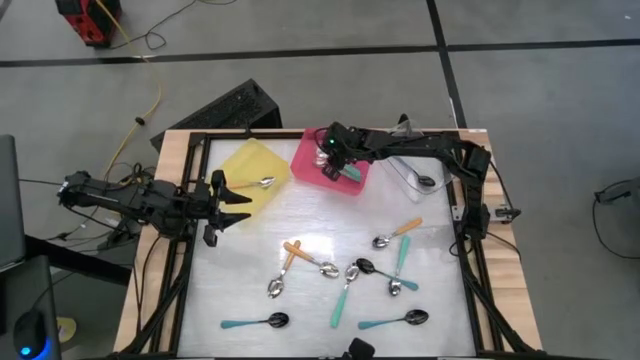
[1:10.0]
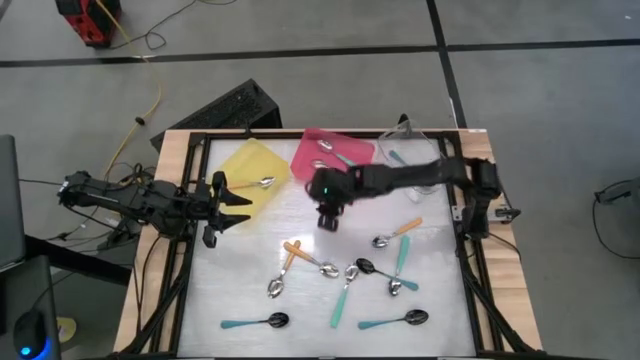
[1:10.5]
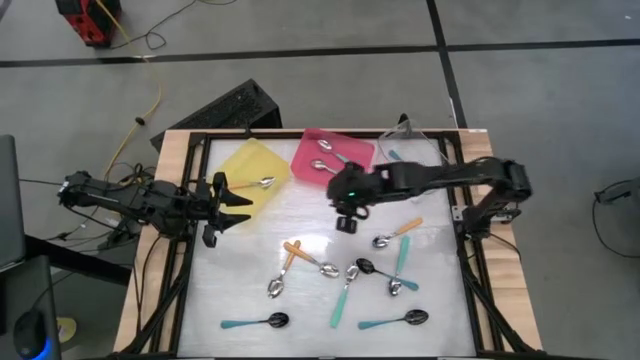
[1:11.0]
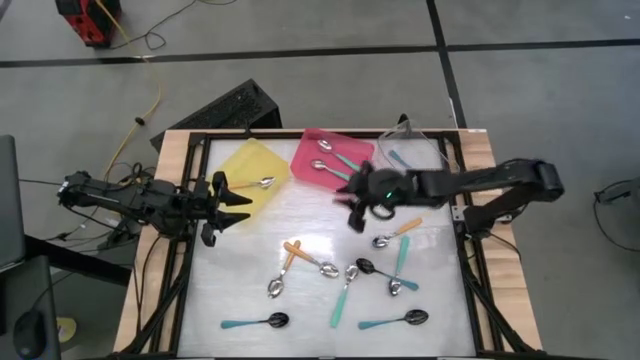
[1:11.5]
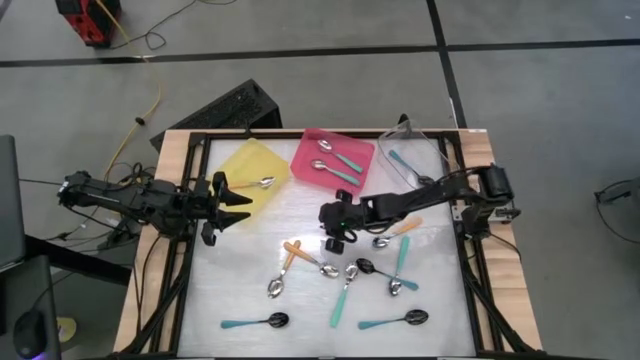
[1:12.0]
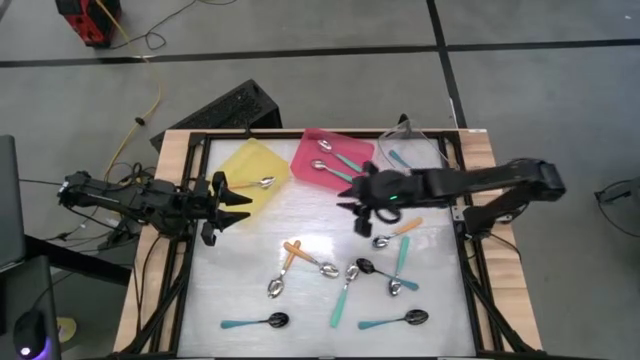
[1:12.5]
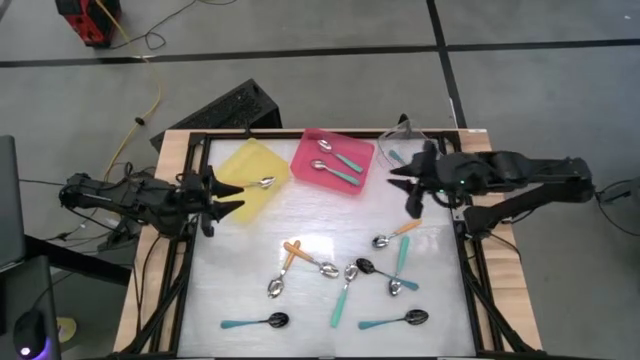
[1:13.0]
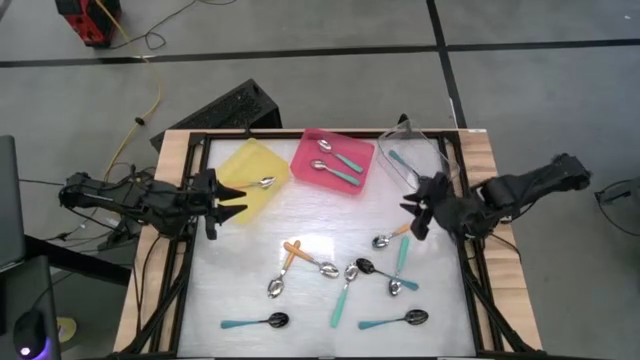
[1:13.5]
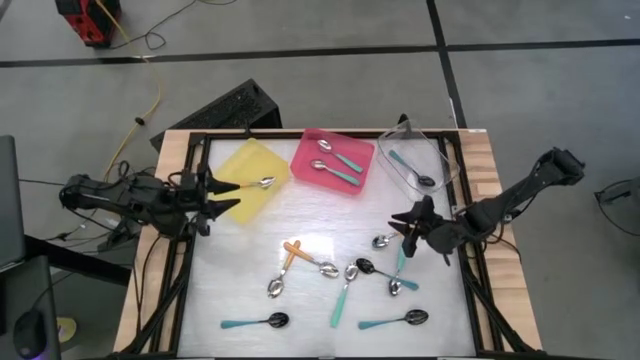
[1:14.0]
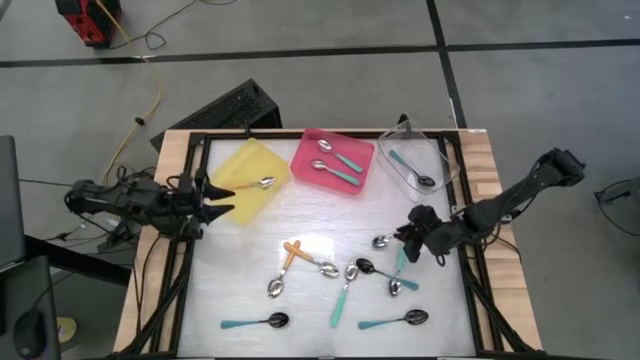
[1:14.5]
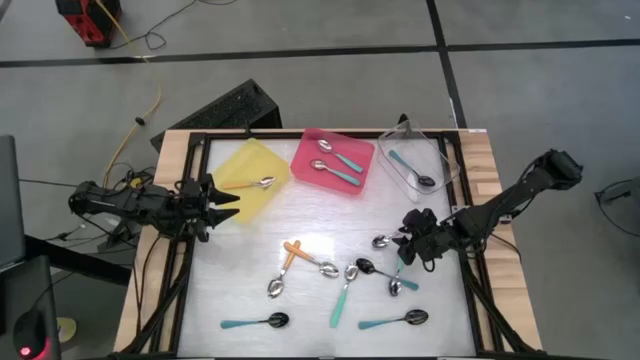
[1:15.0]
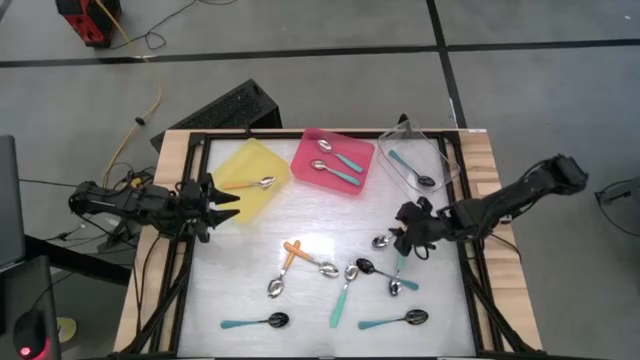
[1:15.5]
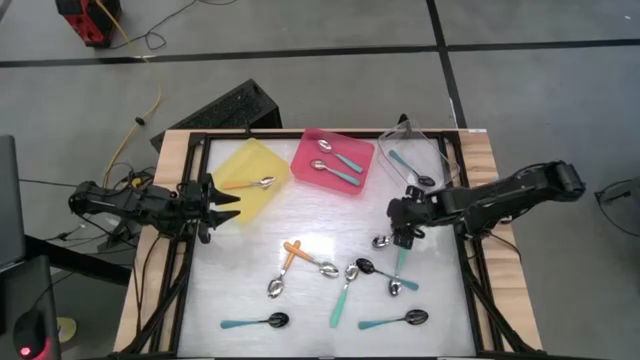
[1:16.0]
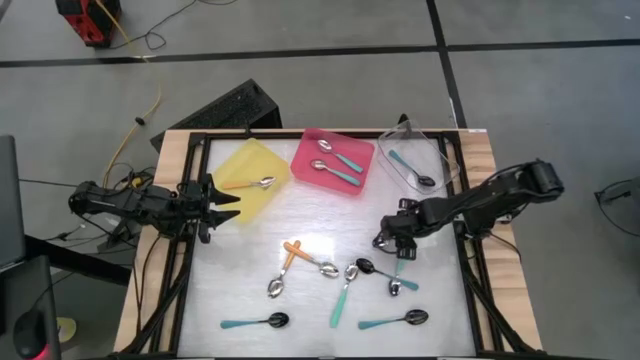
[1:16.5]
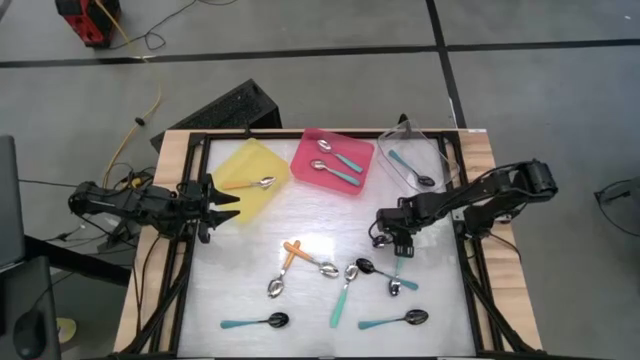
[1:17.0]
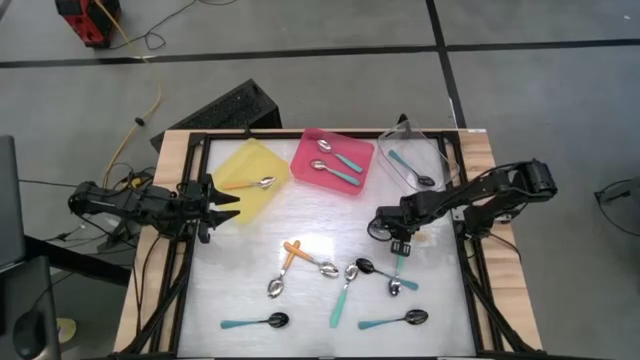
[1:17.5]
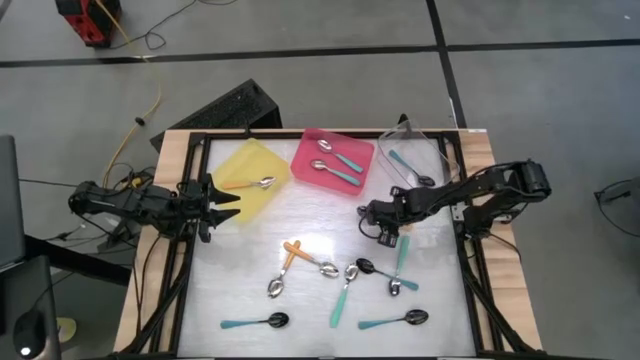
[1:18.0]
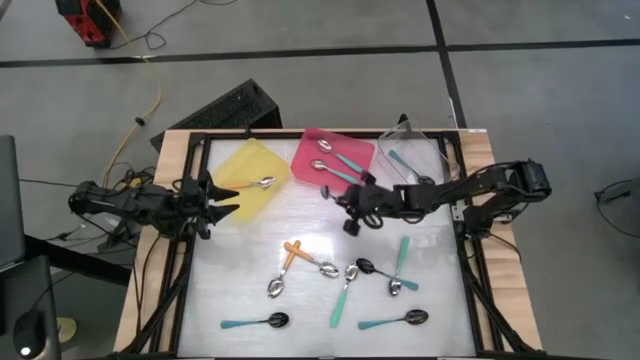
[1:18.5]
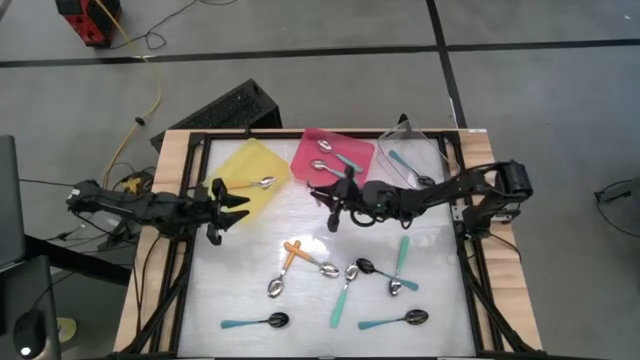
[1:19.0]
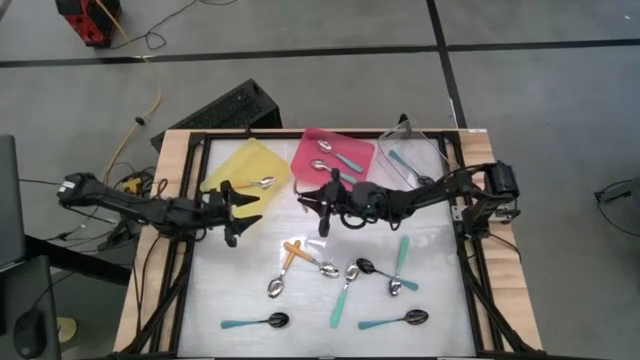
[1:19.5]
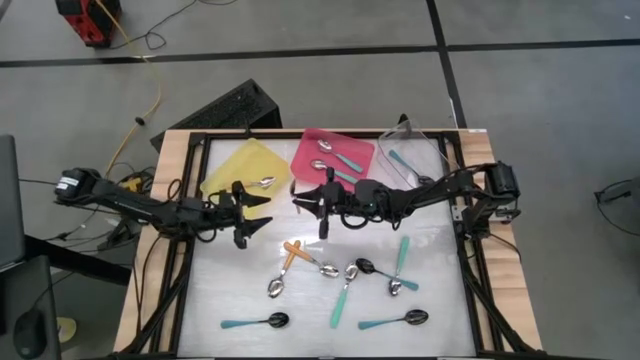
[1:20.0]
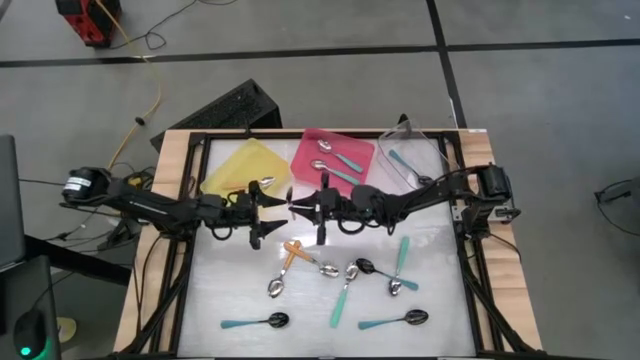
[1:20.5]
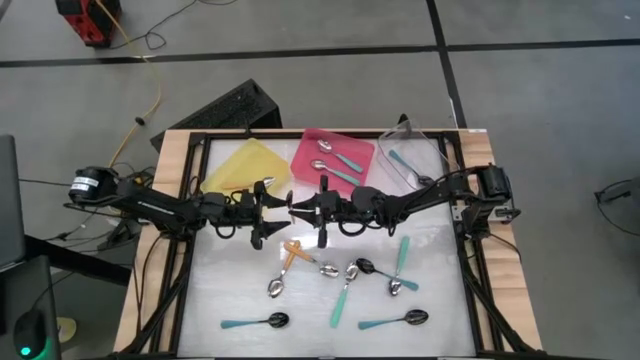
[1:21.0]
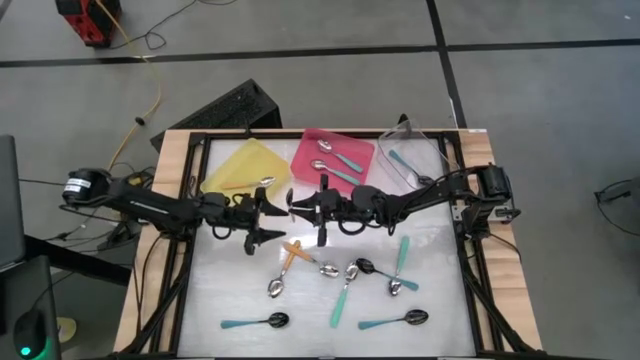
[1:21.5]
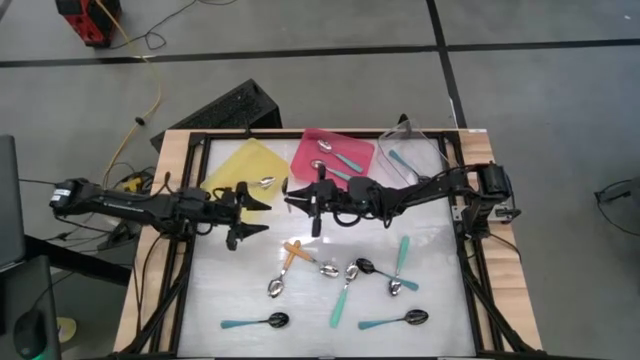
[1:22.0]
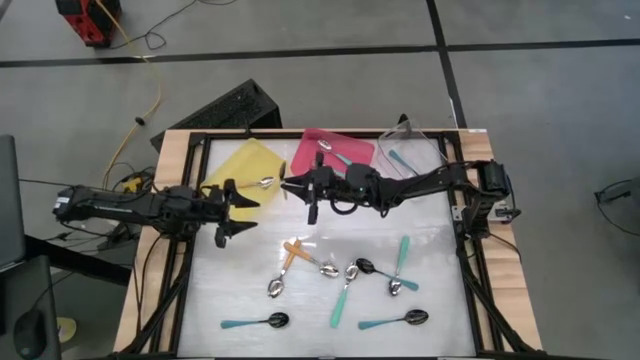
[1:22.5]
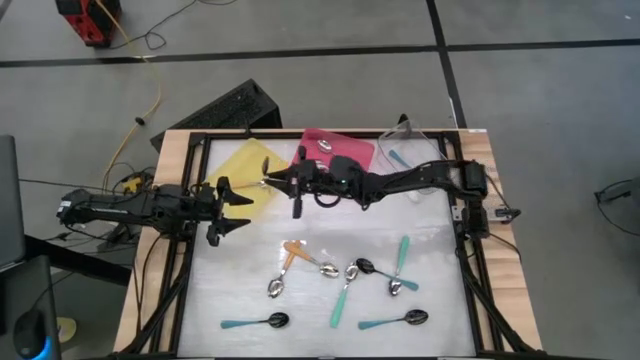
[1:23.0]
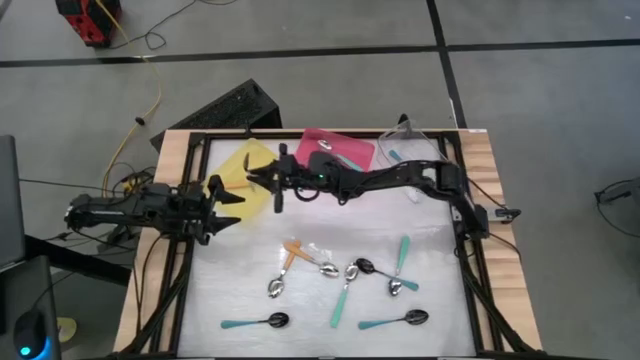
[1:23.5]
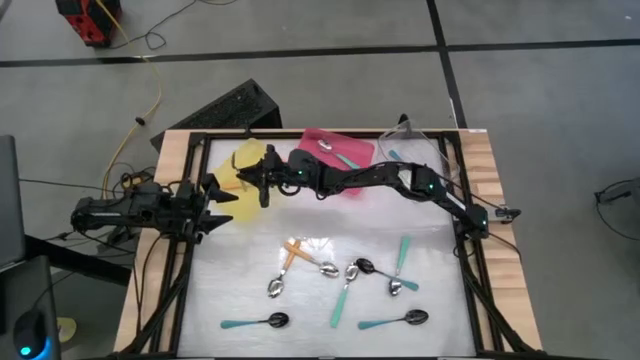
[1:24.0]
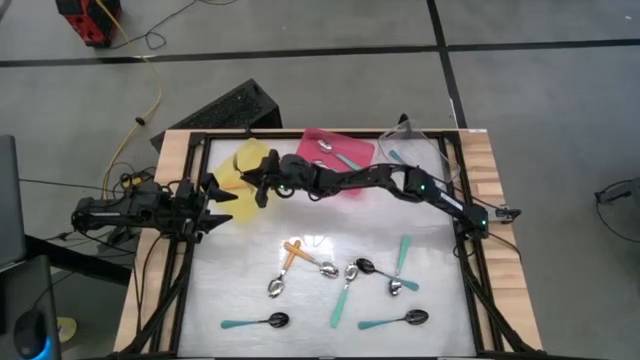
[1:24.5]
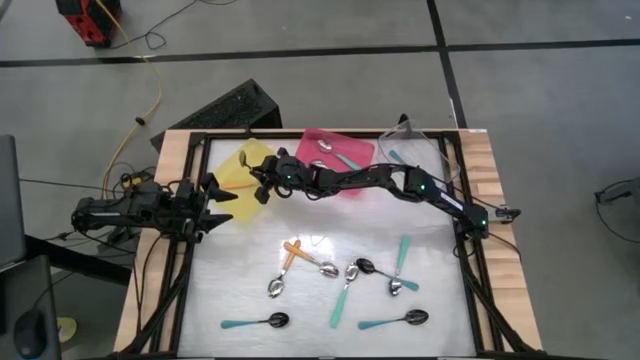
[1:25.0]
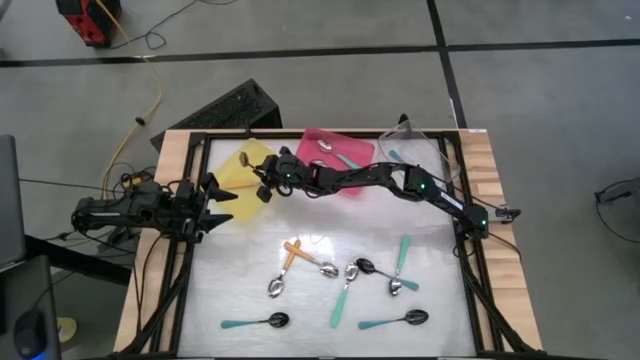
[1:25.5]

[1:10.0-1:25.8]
Task: Sort silverware by color (type)
Put the yellow spoon into the yellow bin

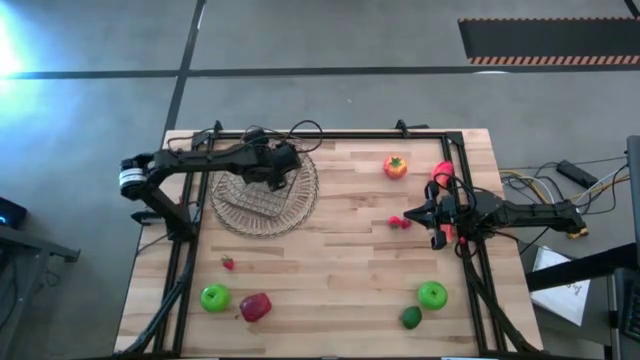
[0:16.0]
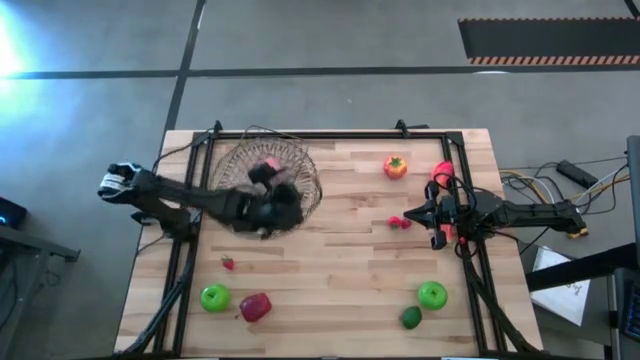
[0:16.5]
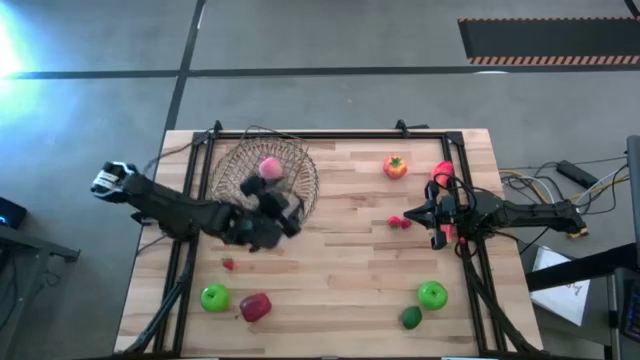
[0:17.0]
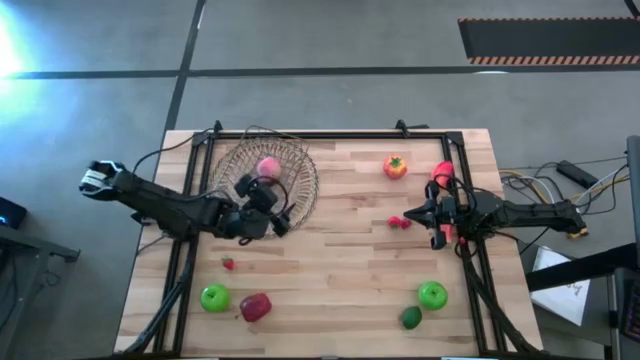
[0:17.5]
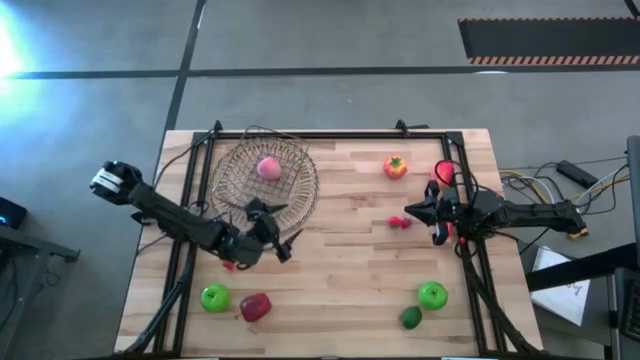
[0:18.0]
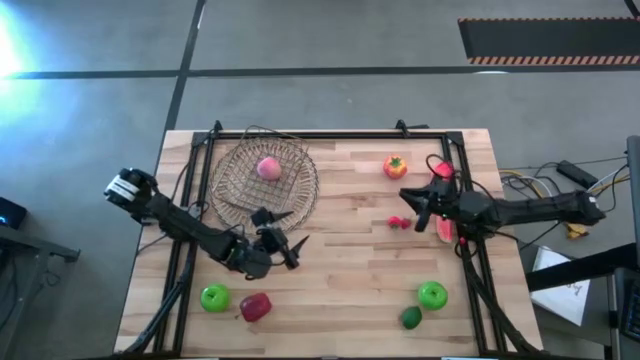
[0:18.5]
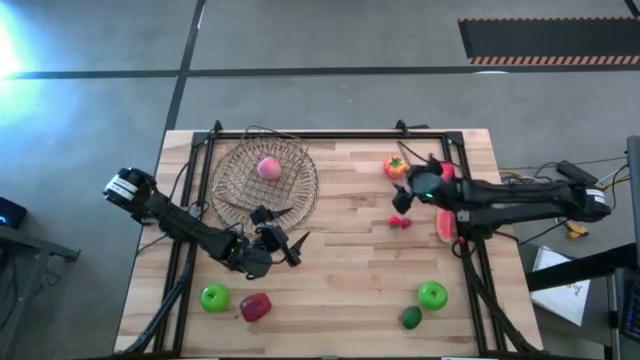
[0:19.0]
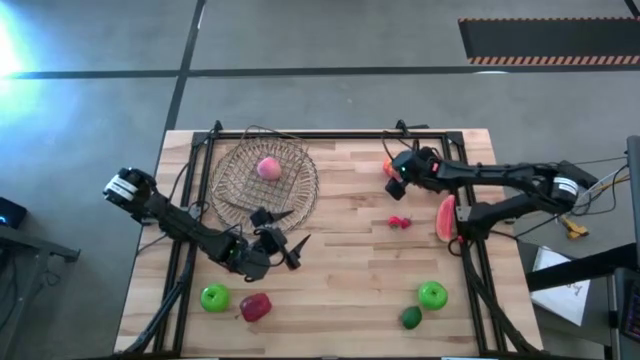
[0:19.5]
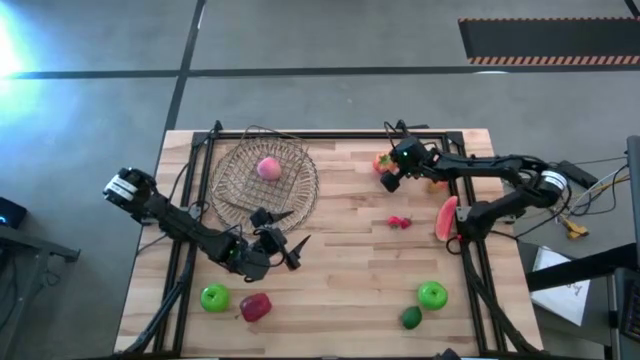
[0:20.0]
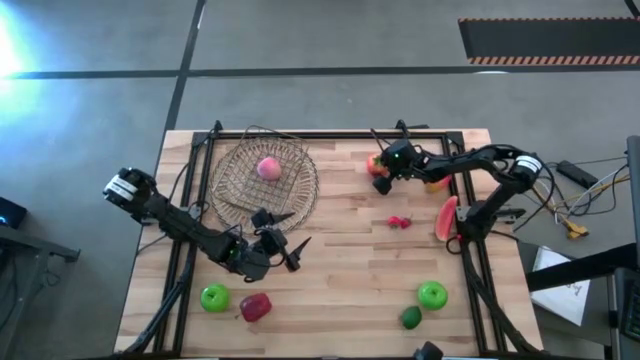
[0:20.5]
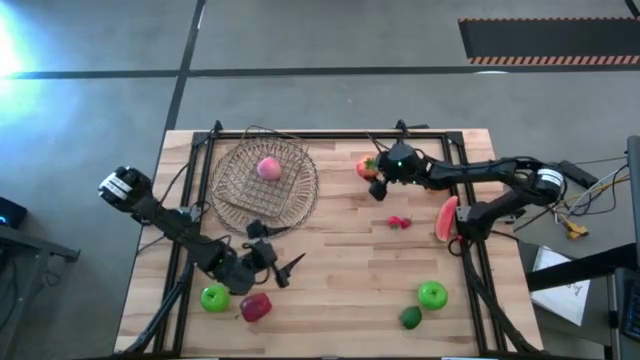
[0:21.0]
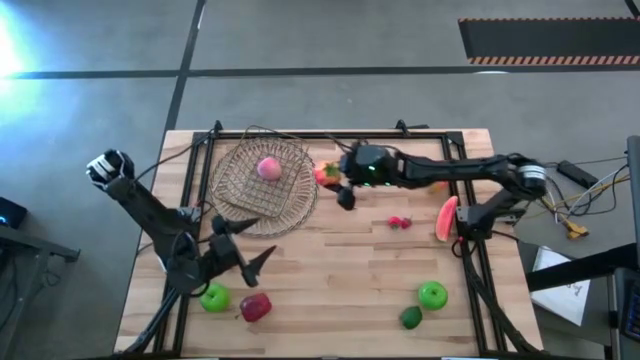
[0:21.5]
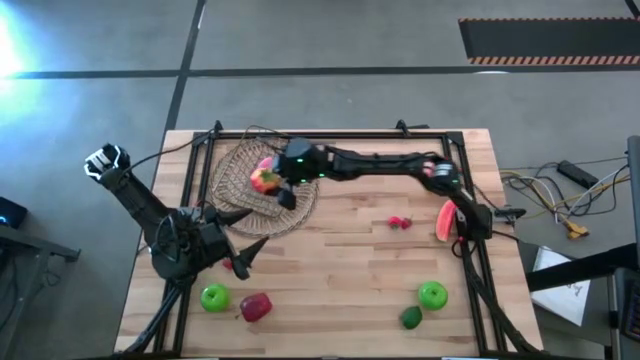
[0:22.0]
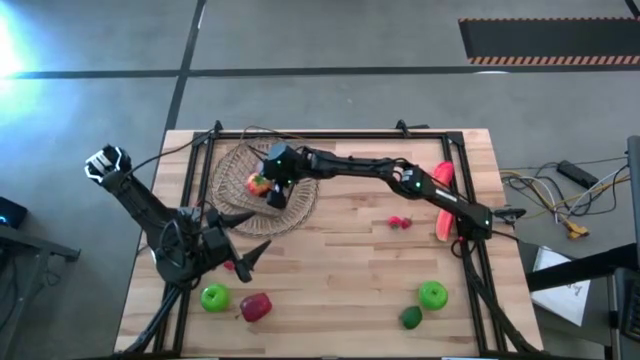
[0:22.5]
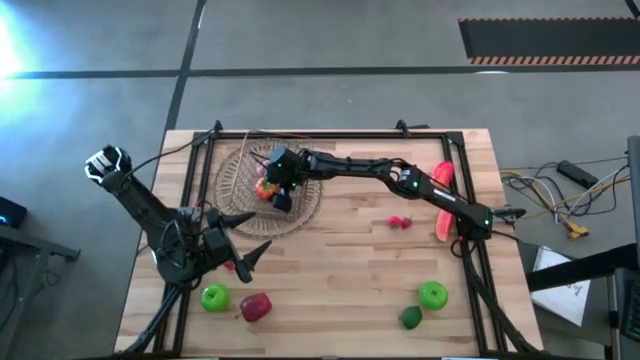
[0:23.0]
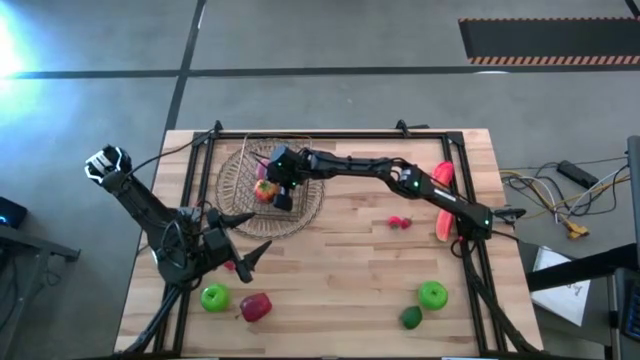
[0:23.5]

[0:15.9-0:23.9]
Task: Build produce basket
Put the persimmon into the basket
